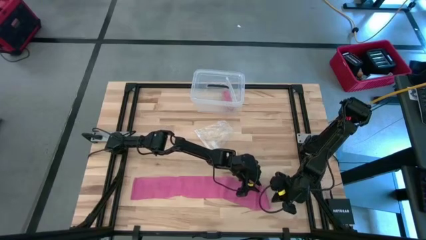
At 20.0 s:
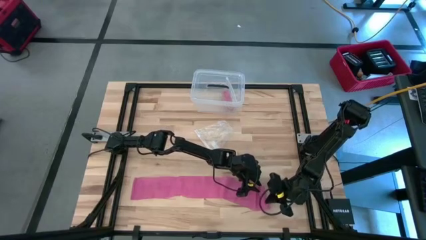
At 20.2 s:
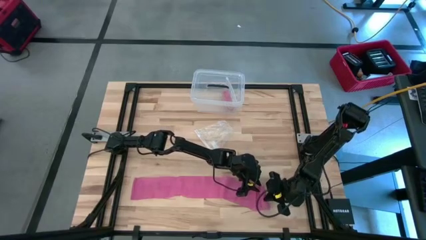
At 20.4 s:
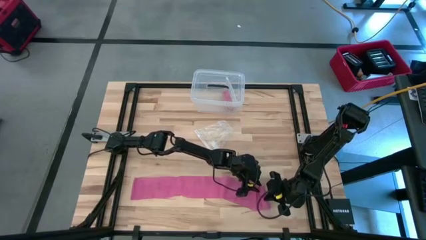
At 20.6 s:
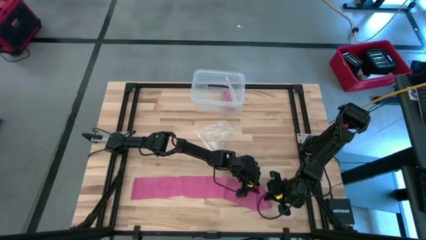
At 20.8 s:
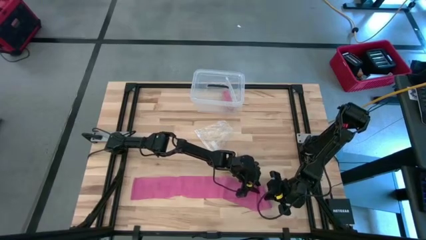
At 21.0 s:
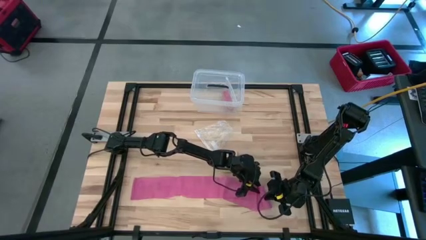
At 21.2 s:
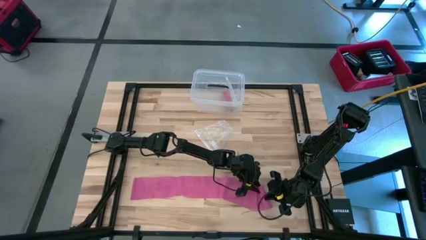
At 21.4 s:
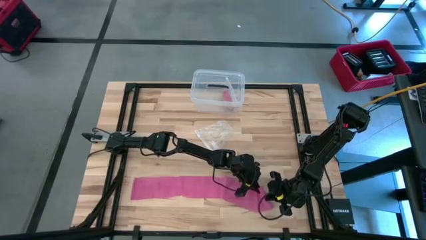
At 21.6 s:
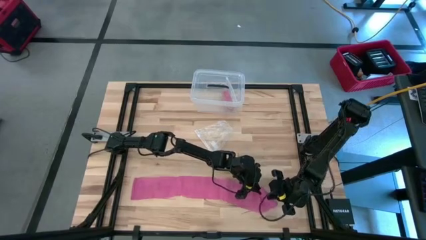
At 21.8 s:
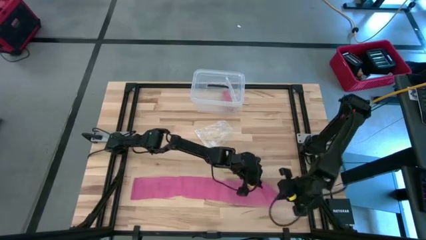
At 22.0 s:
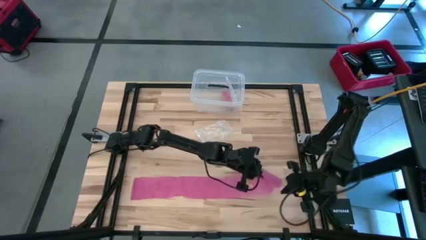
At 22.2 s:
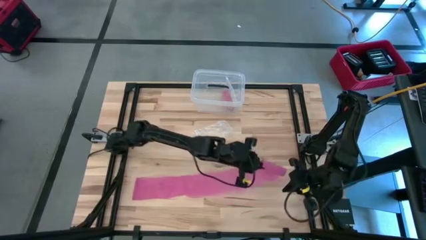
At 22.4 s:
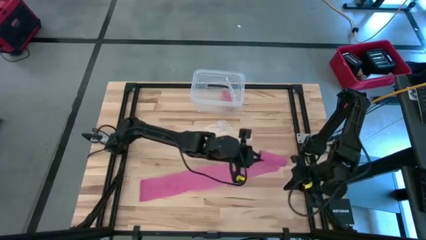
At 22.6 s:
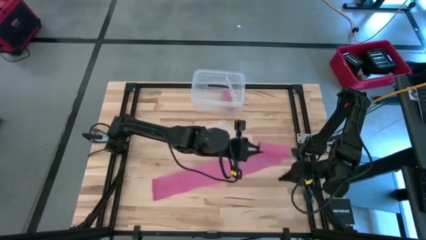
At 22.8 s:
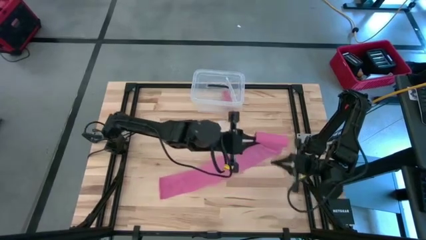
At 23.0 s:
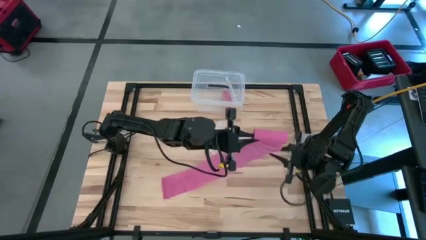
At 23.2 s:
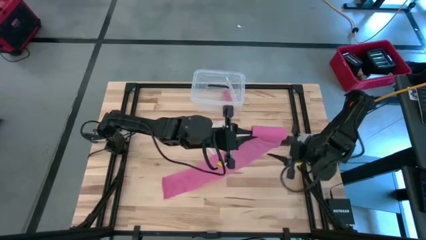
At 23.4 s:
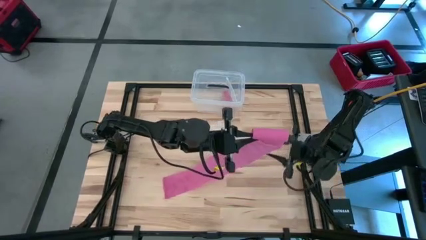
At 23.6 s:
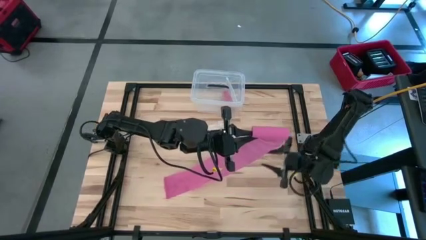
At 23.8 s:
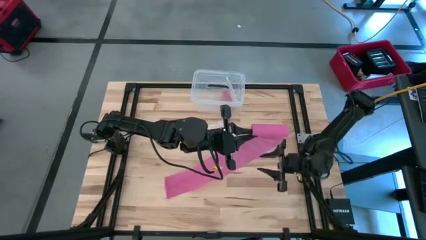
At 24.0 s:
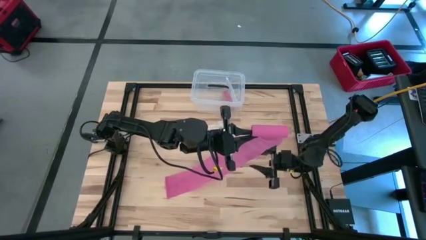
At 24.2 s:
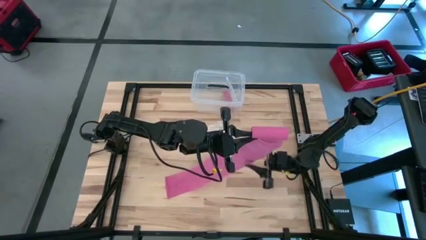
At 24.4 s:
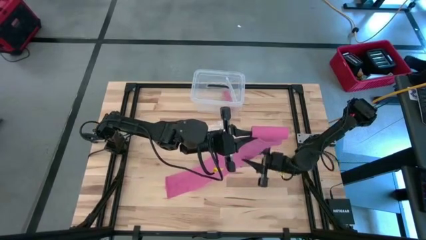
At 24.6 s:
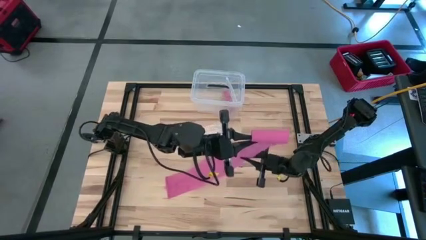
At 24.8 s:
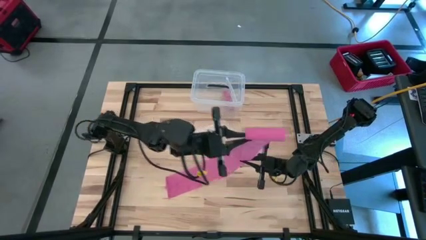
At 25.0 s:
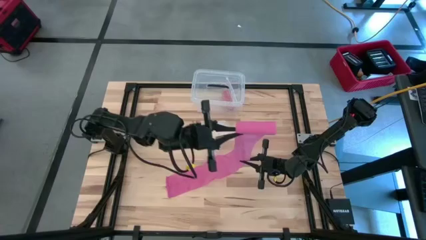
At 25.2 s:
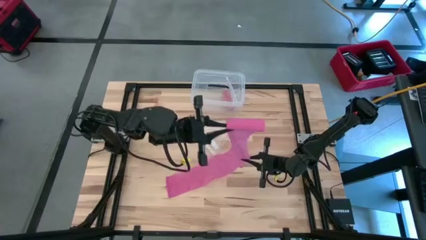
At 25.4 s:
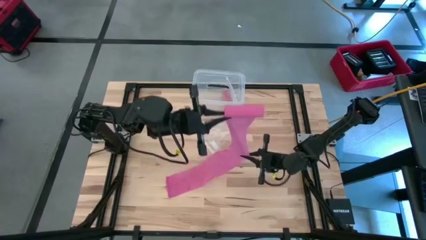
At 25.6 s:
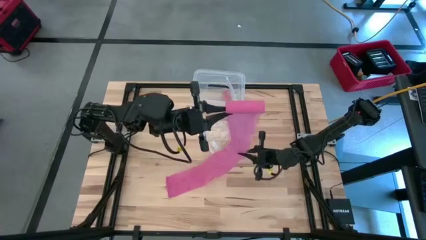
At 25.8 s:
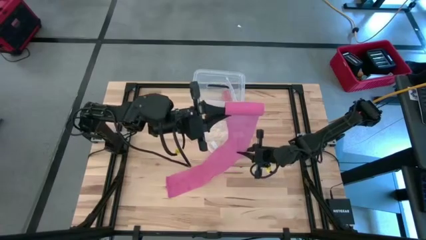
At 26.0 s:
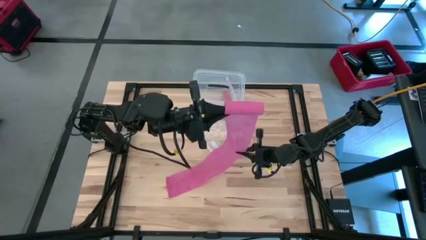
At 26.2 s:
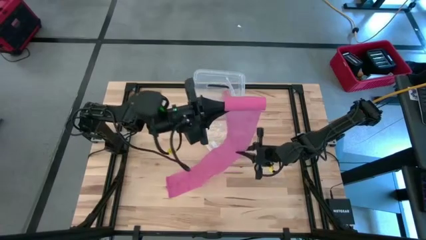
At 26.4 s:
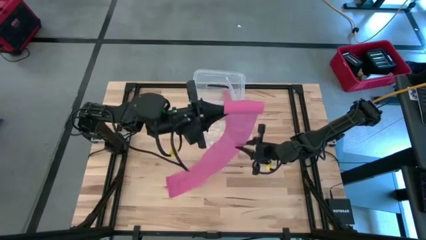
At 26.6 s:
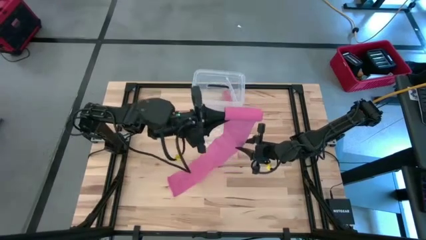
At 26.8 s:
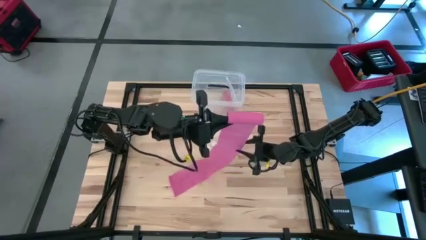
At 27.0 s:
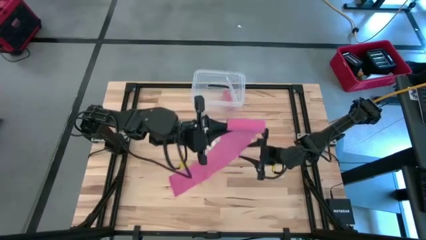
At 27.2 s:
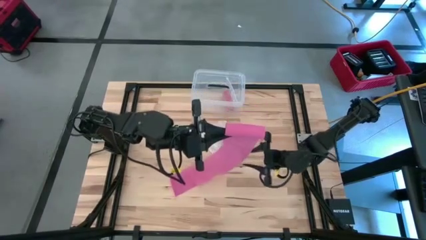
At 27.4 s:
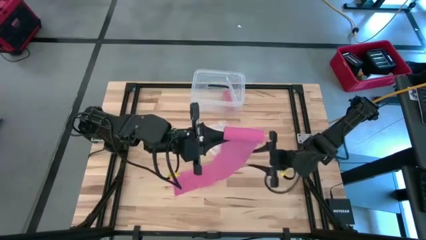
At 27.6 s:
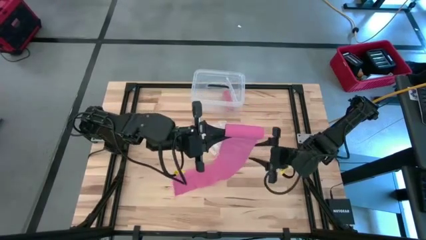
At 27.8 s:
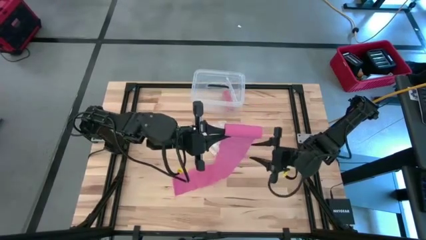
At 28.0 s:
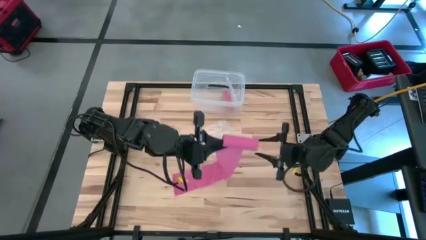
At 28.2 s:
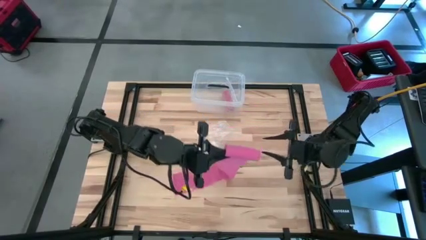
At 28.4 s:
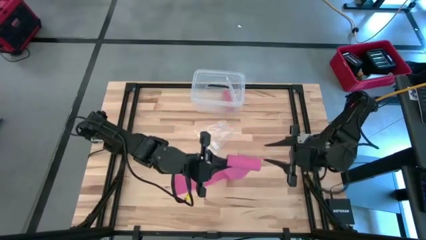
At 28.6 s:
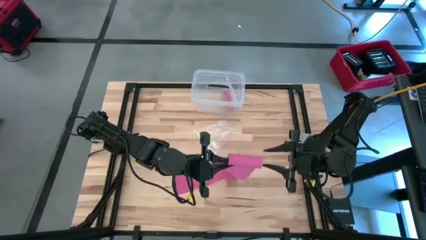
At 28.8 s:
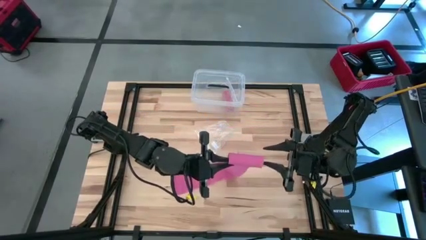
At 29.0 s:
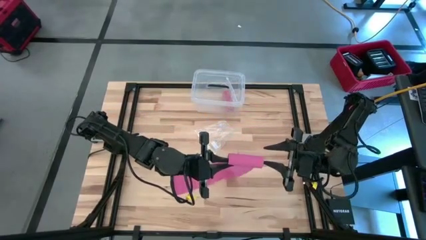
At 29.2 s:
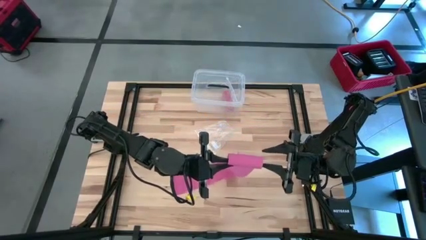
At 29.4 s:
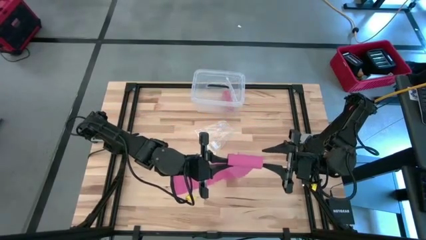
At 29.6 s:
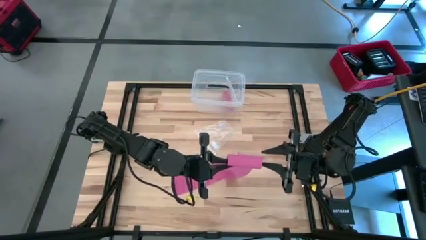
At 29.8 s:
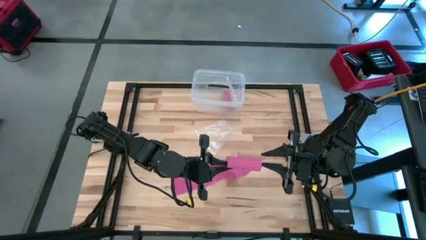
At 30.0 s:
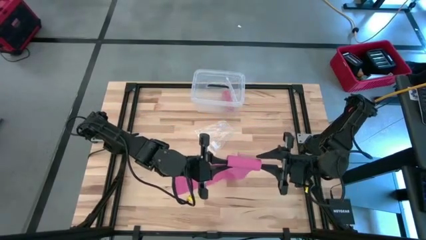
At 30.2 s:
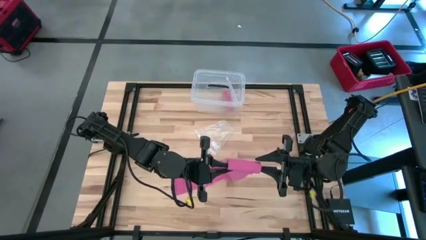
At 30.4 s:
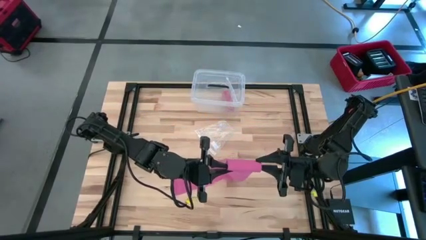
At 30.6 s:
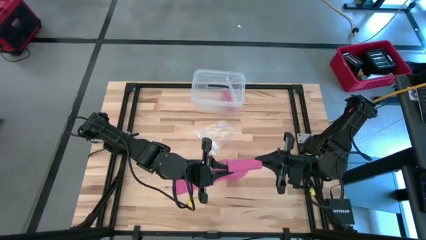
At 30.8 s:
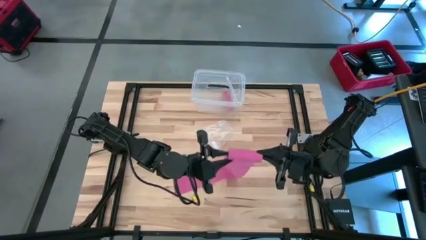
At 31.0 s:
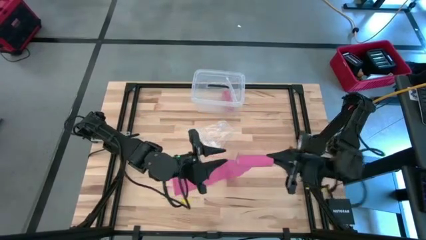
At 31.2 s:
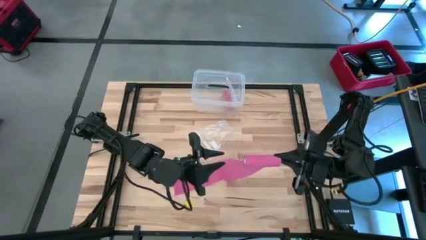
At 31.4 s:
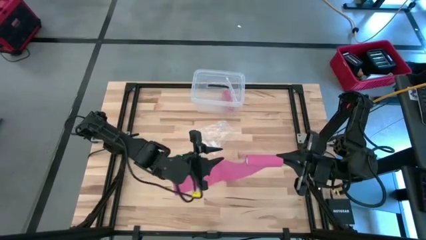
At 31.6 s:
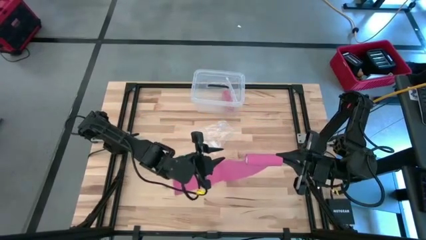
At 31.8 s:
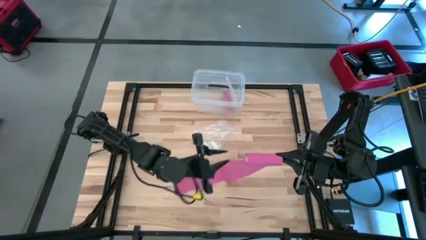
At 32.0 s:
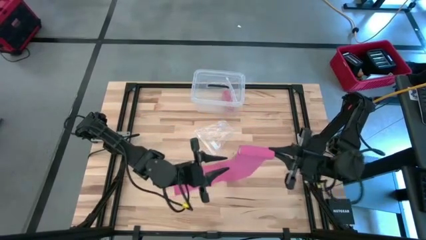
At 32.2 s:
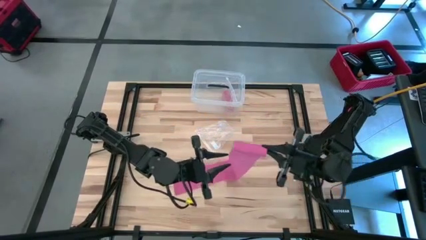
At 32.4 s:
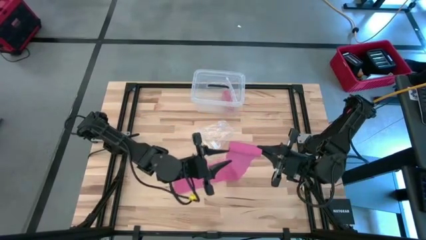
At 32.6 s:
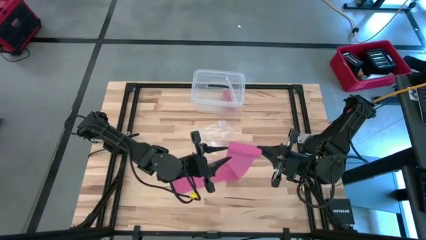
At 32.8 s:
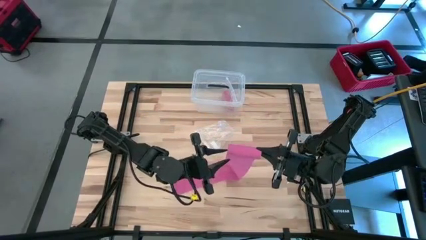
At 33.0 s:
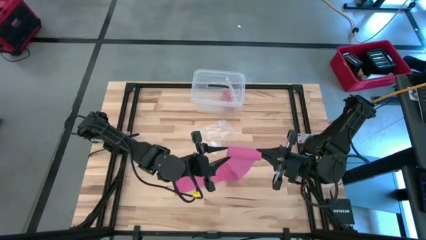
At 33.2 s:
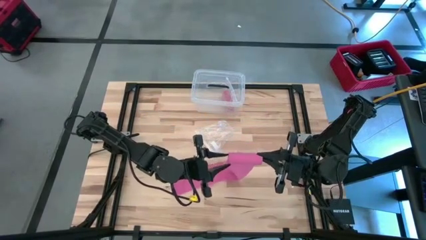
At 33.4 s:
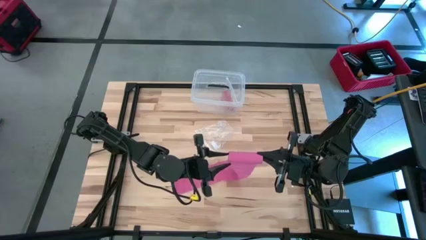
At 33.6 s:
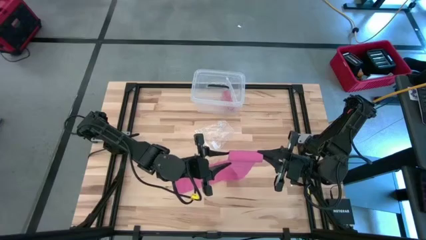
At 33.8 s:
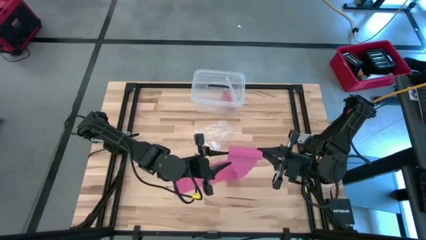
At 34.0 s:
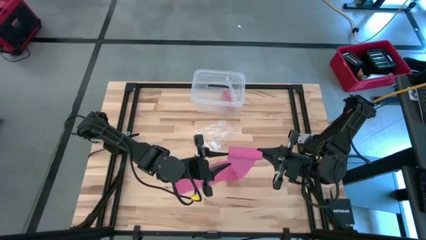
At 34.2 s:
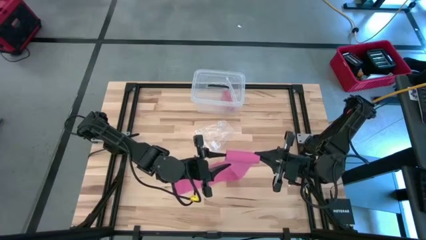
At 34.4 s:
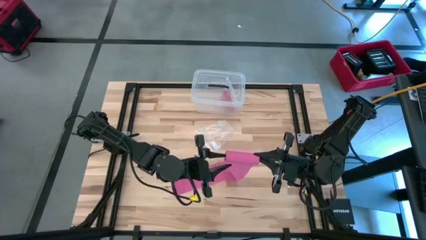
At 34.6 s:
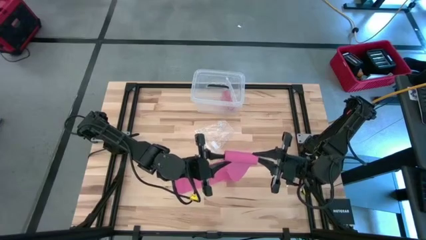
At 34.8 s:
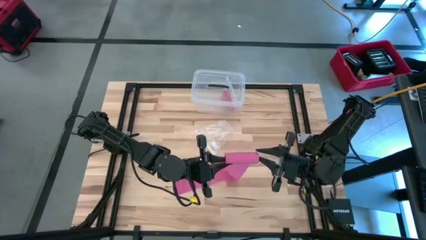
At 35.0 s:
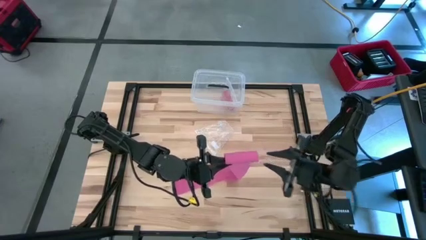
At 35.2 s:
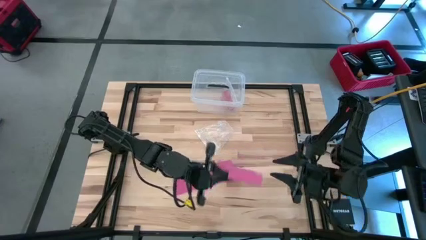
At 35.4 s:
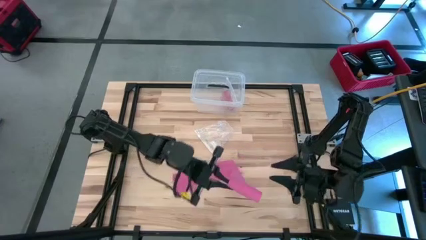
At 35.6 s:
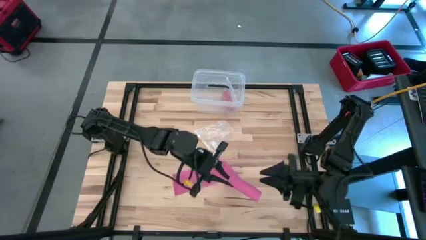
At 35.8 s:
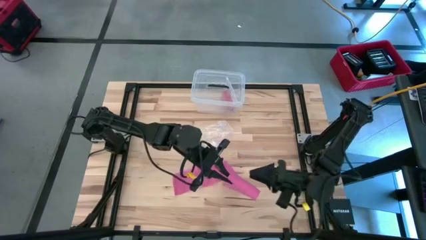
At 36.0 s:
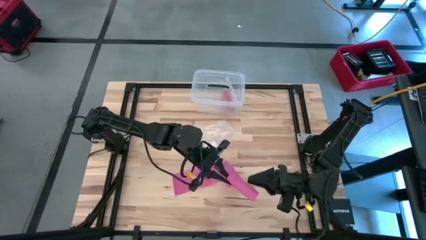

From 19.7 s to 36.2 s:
Task: Roll bandage
Roll the pink bandage
